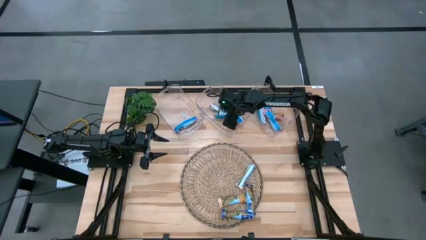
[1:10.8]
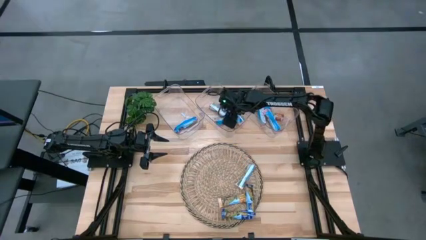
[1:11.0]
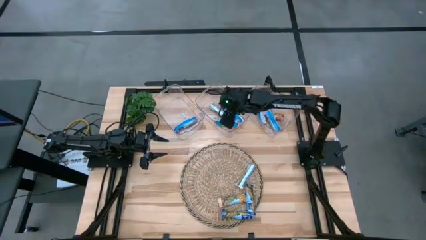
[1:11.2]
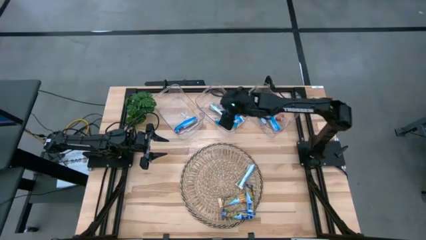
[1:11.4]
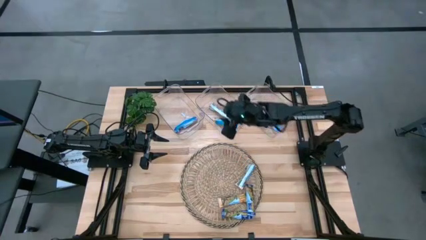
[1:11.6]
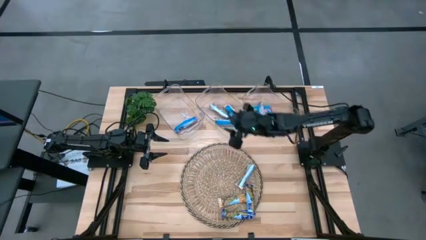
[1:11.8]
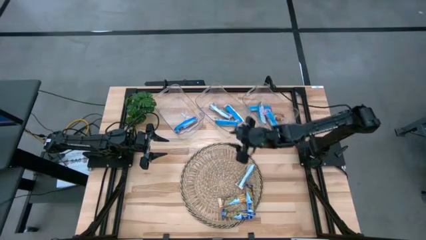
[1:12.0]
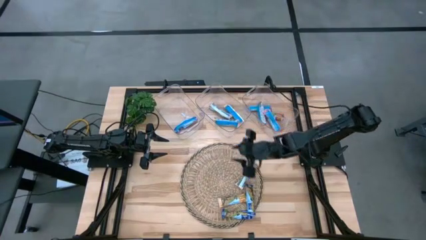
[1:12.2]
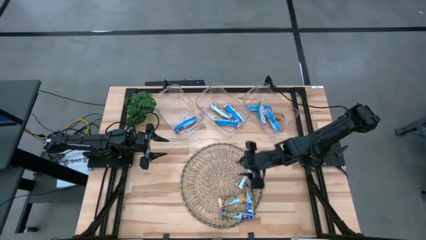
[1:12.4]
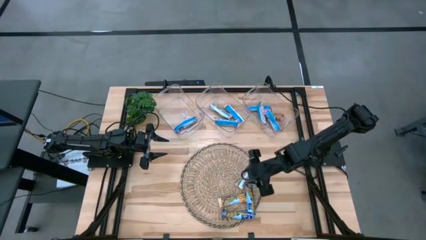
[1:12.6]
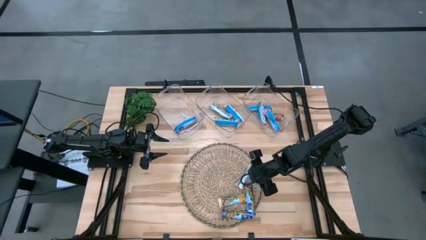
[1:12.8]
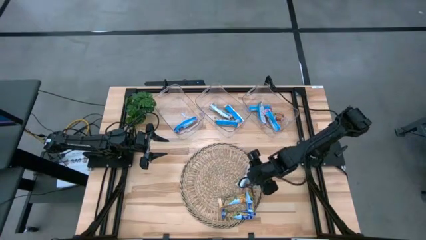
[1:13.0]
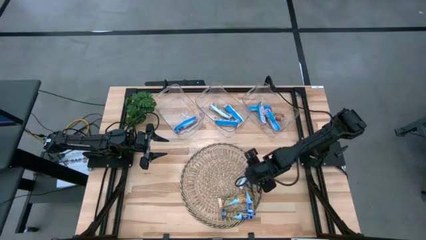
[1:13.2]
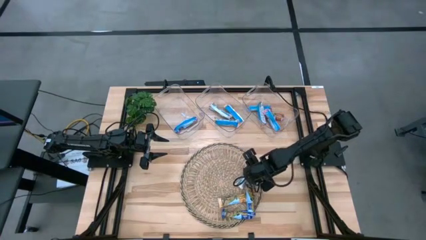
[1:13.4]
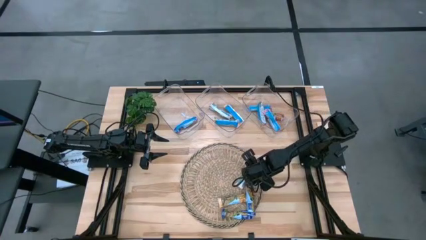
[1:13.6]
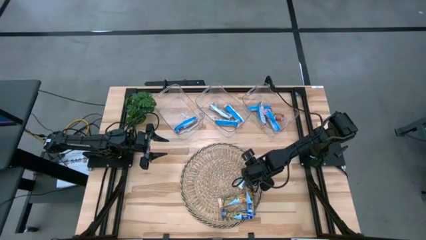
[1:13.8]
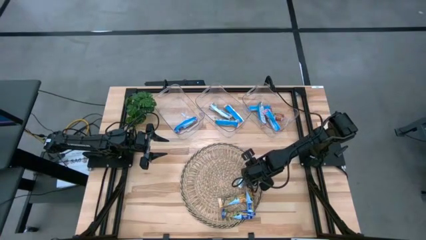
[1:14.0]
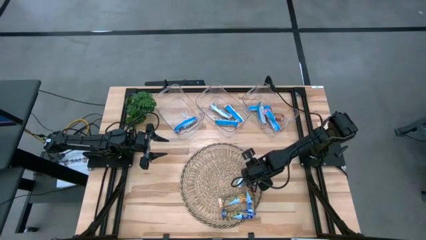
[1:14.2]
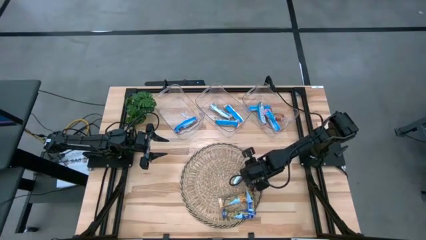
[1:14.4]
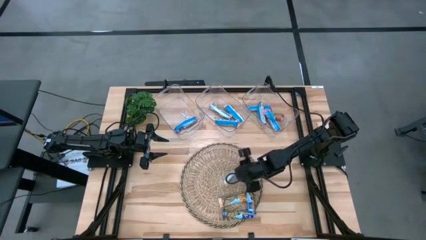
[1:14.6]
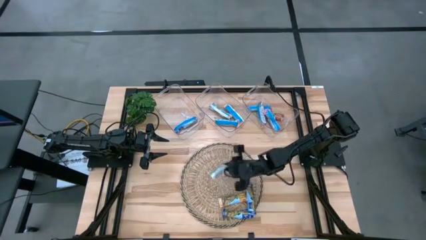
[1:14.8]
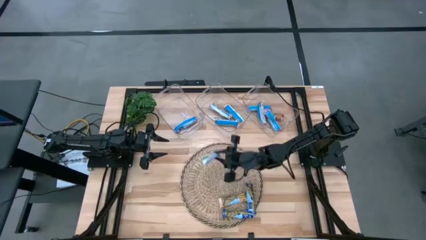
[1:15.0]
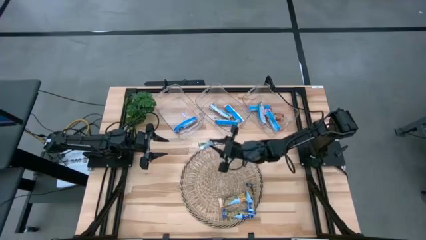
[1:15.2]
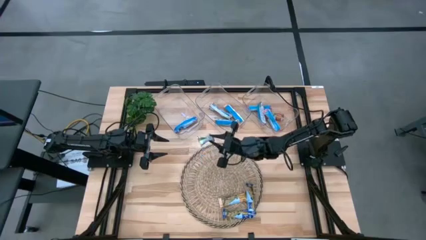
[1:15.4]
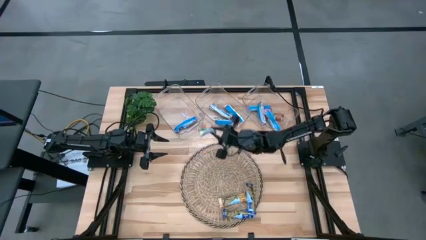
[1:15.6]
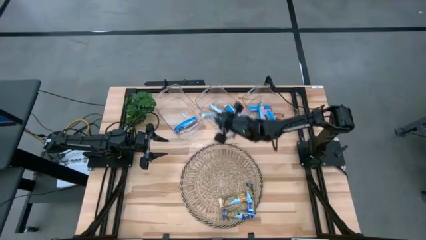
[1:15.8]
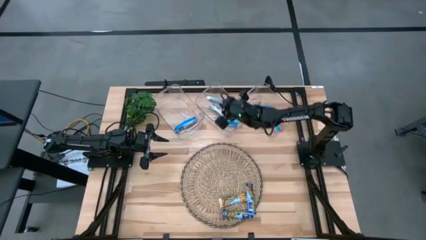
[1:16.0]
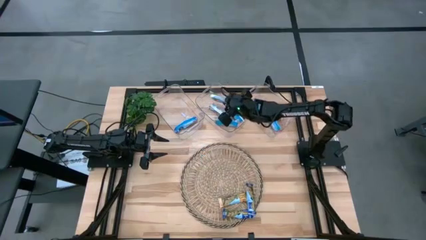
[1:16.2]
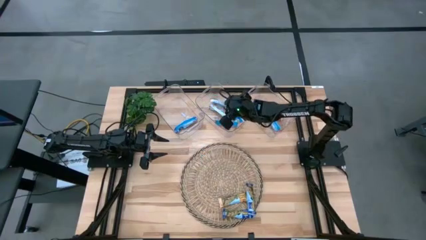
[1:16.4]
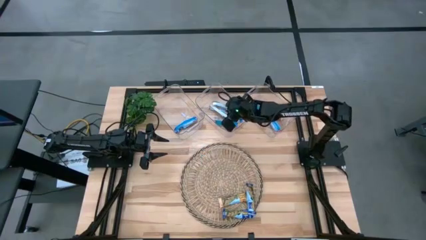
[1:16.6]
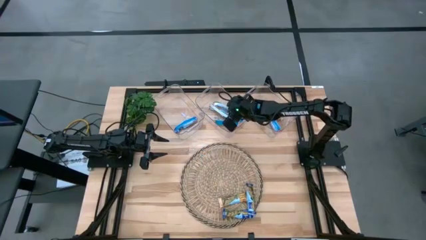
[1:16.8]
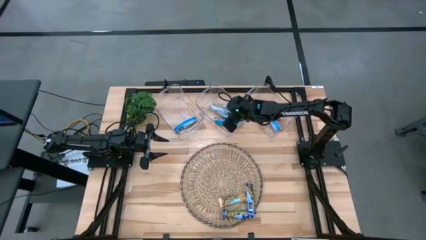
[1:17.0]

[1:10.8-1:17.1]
Task: Pick and place Granola Bars by type
Put the yellow granola bar into the middle transparent bin

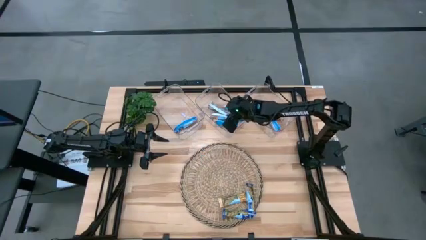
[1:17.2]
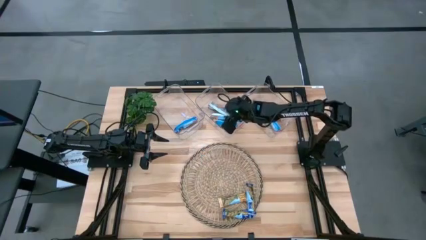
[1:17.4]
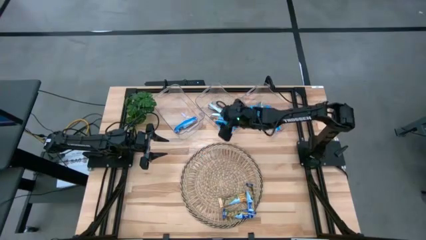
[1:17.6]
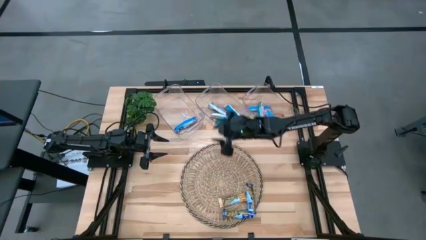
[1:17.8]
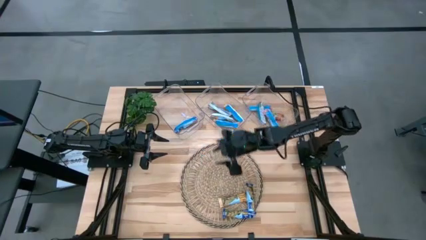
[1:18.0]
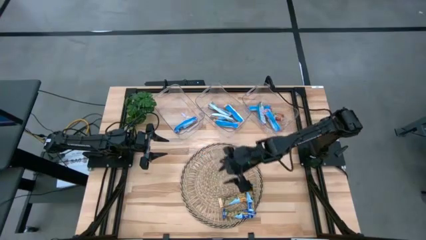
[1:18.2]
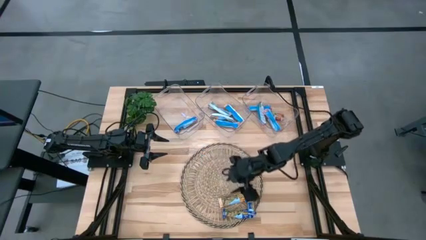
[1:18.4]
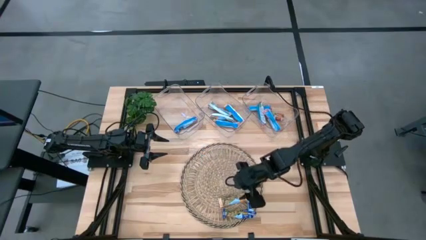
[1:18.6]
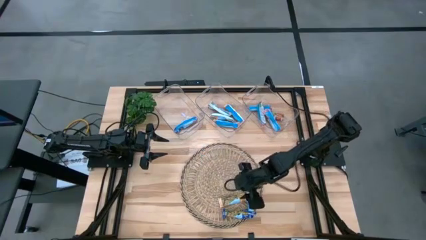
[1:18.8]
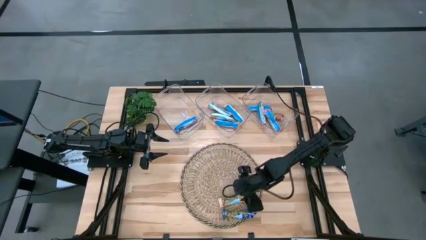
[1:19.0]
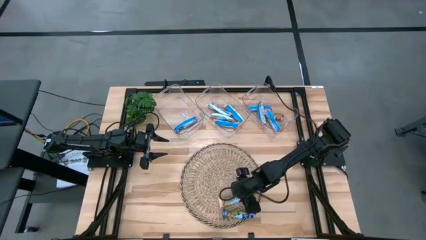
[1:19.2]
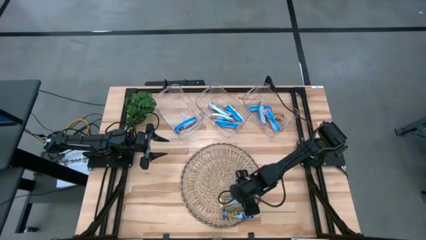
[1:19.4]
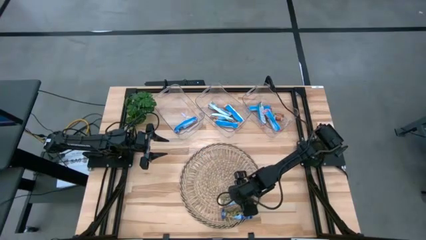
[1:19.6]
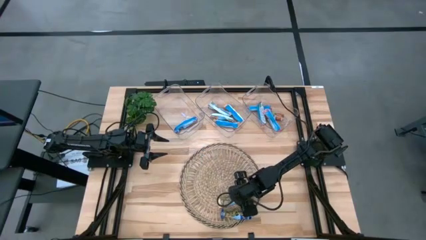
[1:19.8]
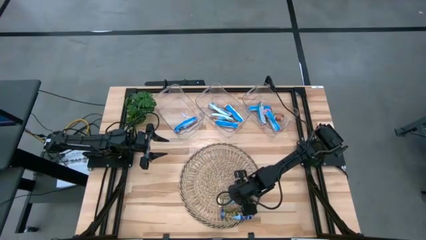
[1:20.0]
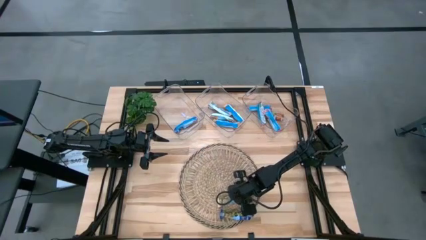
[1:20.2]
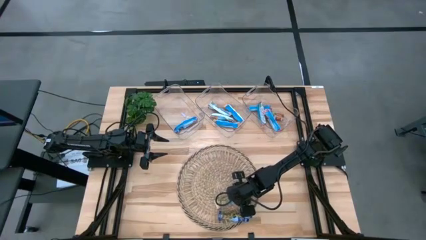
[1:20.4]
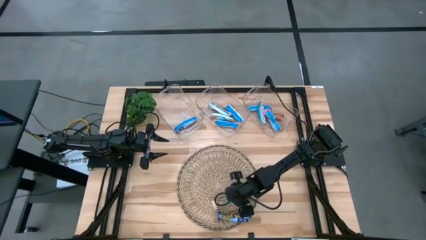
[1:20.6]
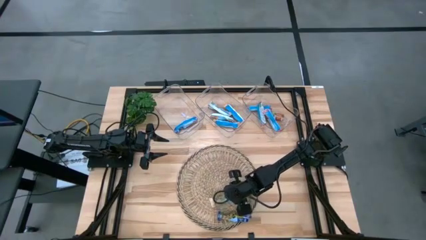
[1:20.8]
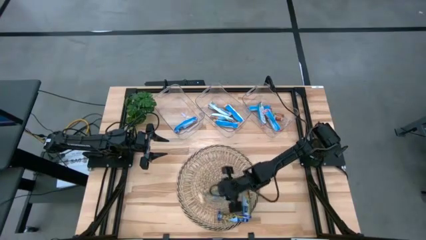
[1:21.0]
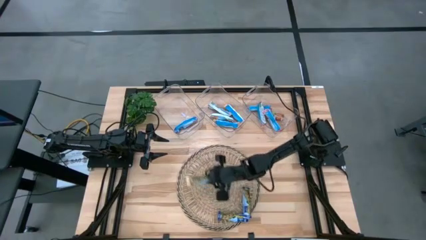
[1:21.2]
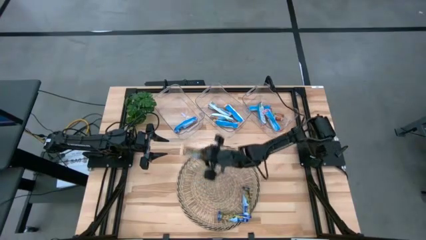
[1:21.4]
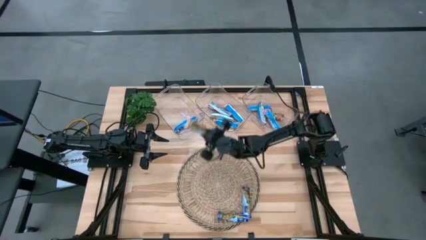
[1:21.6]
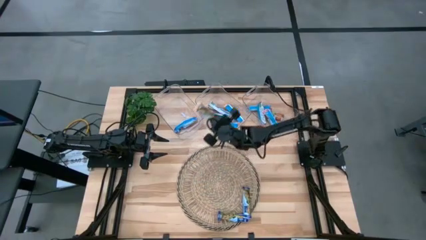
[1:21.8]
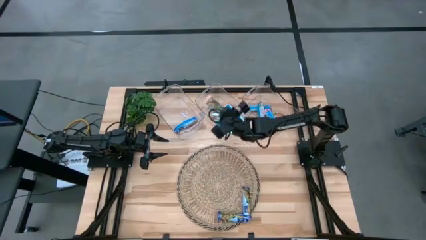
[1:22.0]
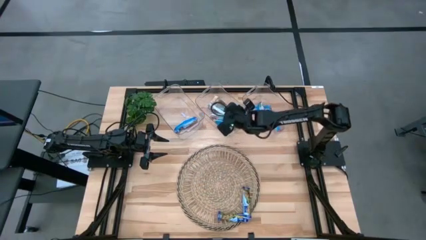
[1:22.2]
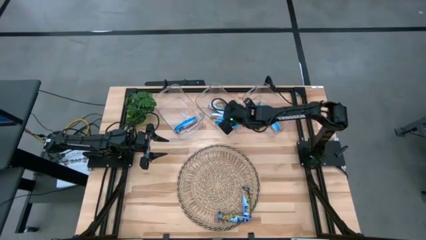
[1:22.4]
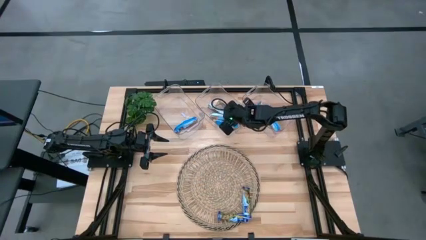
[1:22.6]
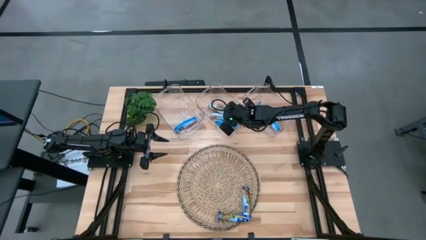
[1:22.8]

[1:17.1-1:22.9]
Put the yellow granola bar into the middle transparent bin

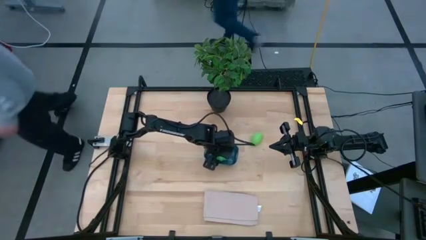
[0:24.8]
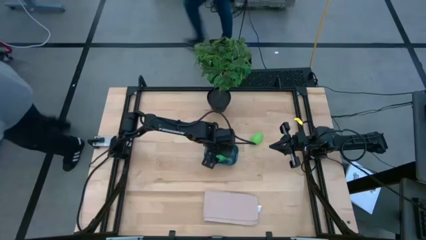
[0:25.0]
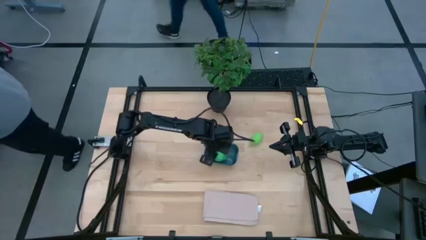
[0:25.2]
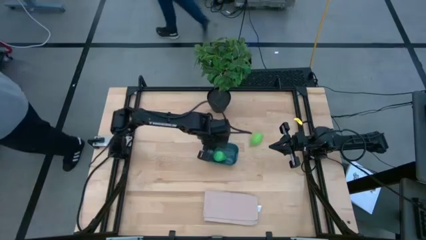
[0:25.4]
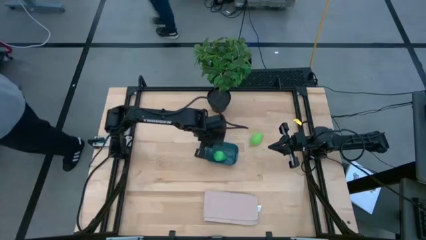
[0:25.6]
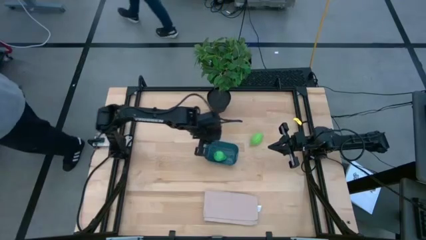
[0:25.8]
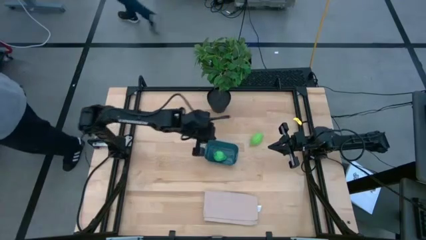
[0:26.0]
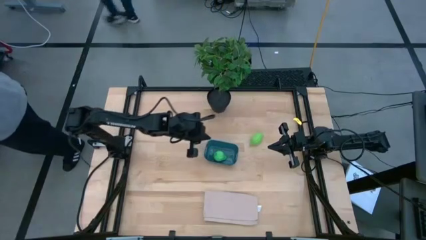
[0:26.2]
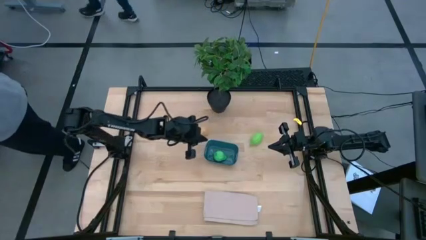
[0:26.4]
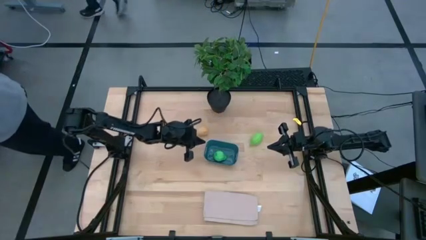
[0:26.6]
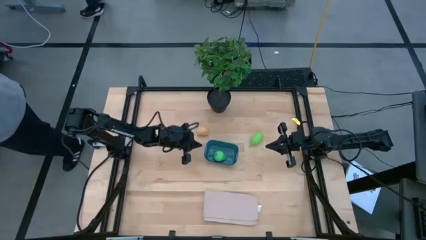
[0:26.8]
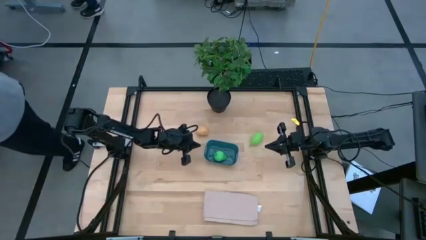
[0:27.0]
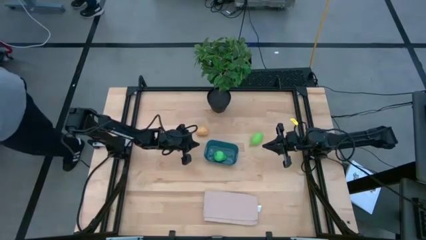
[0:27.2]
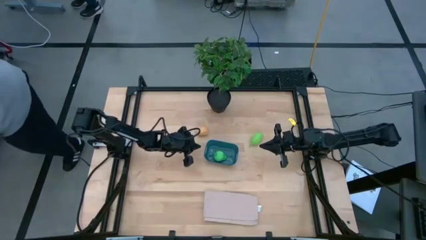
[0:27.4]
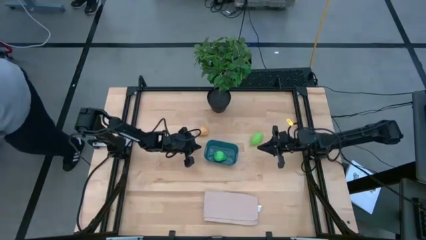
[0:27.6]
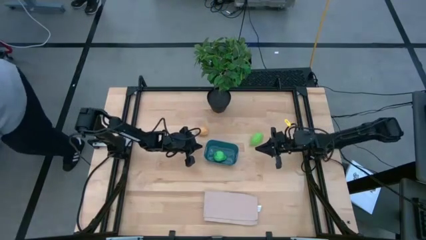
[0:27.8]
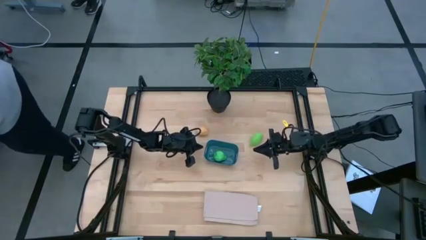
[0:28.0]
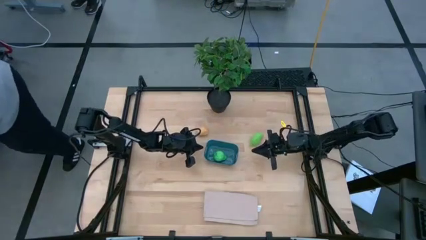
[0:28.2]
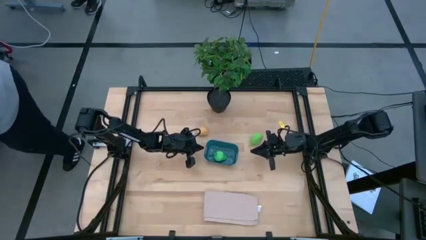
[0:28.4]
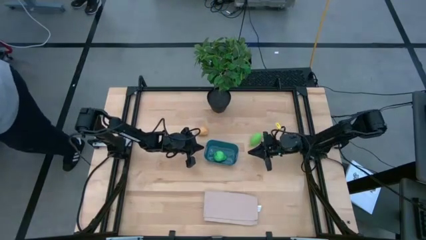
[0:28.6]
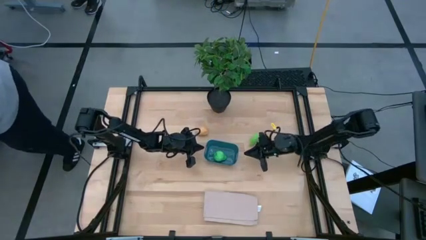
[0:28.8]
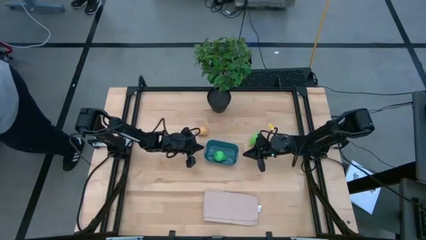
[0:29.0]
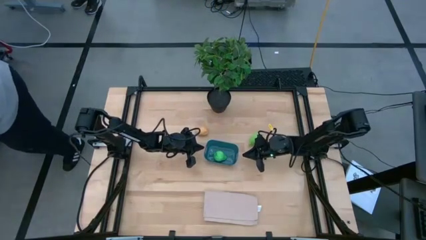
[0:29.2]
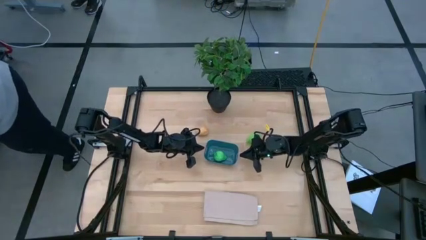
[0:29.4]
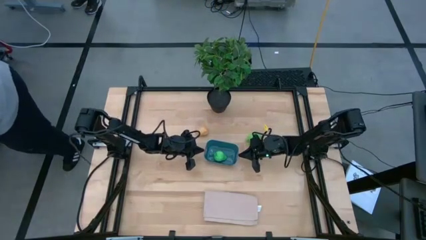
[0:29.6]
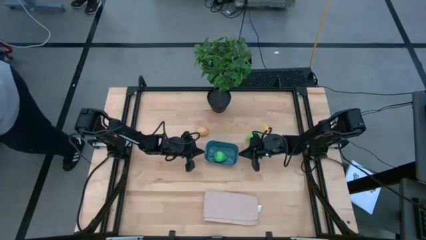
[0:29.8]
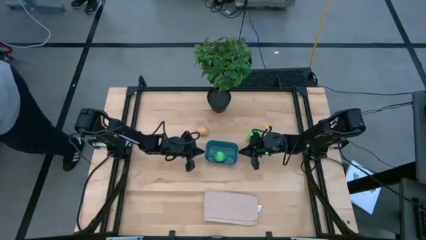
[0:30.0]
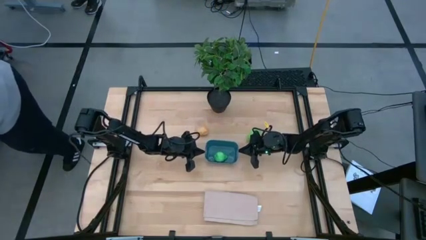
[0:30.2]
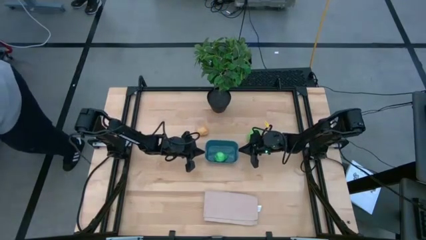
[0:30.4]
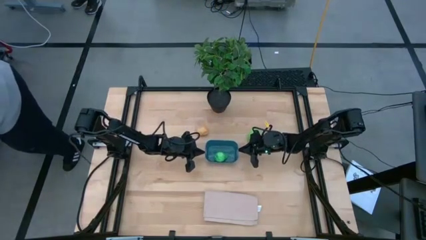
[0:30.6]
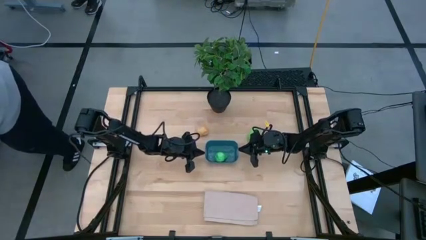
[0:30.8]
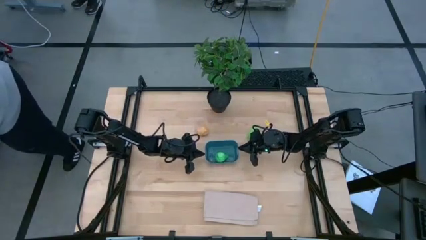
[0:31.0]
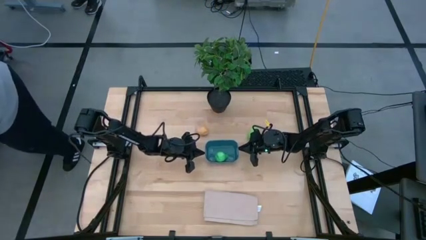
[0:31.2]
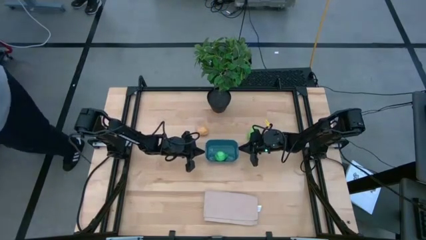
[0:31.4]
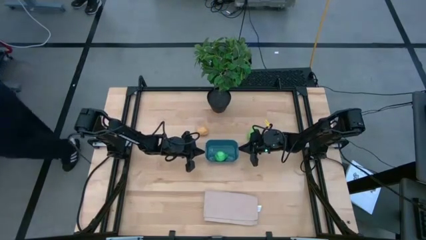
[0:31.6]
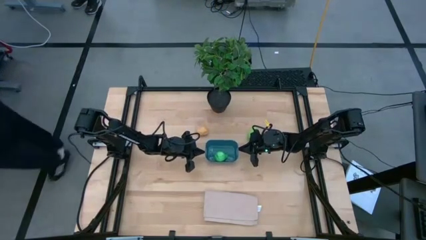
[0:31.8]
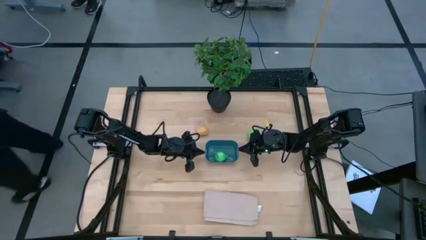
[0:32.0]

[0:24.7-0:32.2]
Task: Pick and placing Produce into tupperware
Adjust the blue container
